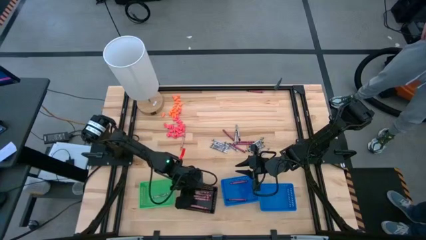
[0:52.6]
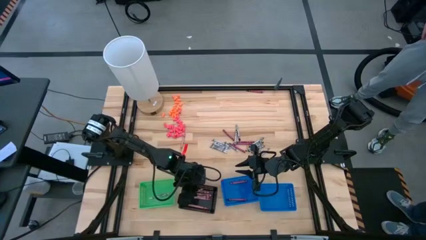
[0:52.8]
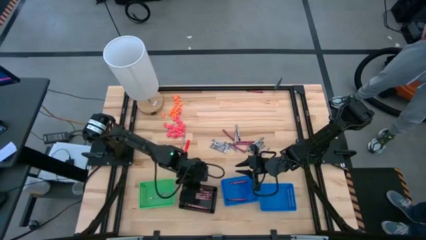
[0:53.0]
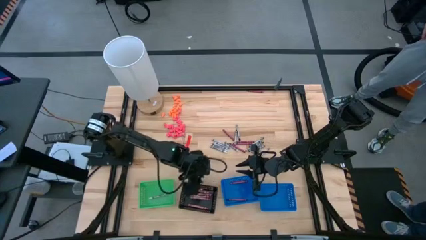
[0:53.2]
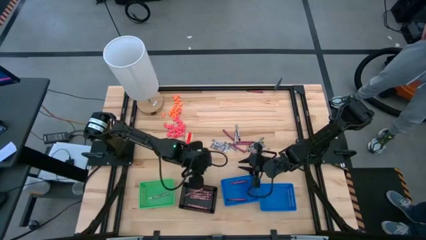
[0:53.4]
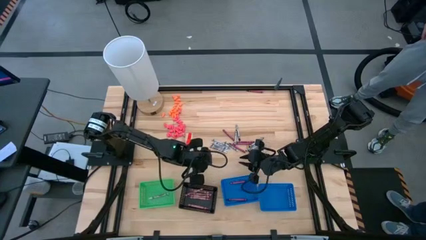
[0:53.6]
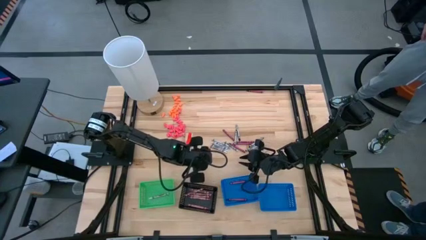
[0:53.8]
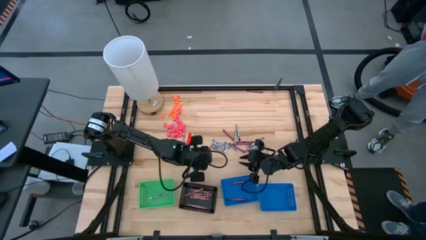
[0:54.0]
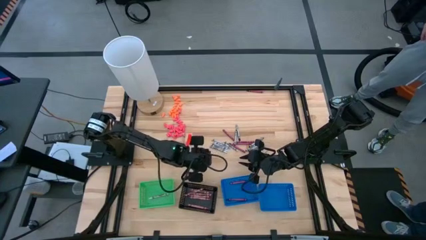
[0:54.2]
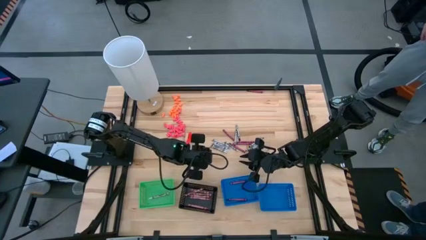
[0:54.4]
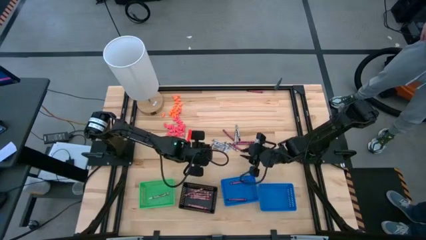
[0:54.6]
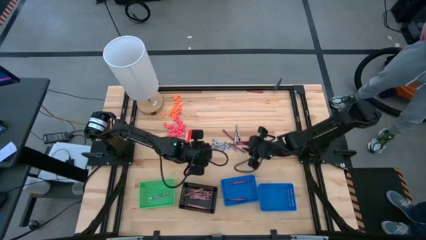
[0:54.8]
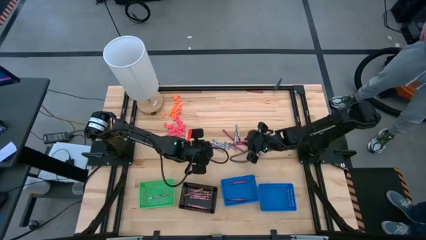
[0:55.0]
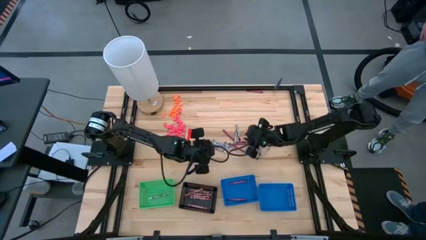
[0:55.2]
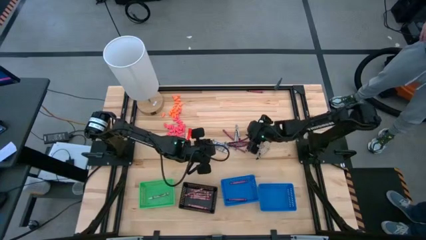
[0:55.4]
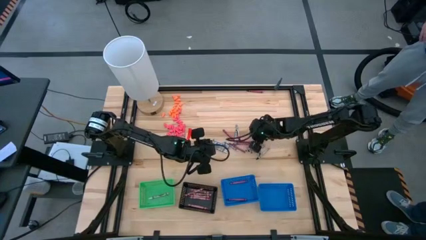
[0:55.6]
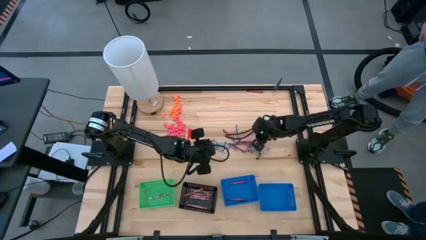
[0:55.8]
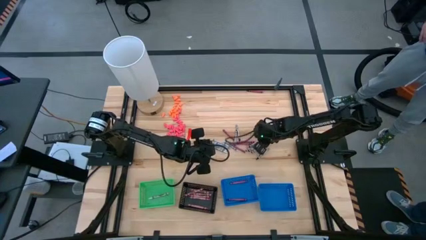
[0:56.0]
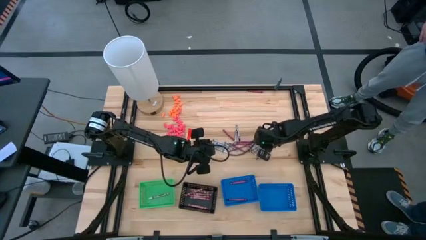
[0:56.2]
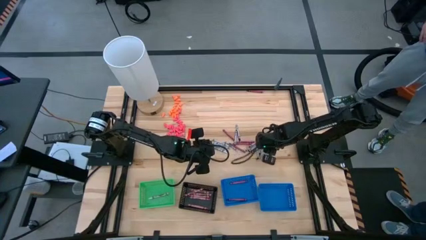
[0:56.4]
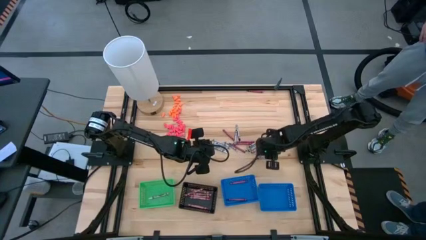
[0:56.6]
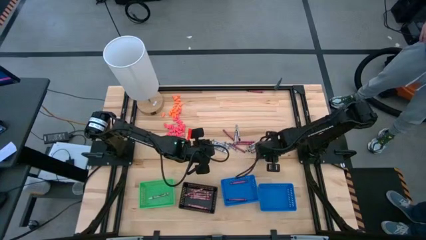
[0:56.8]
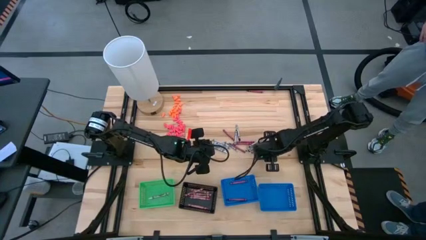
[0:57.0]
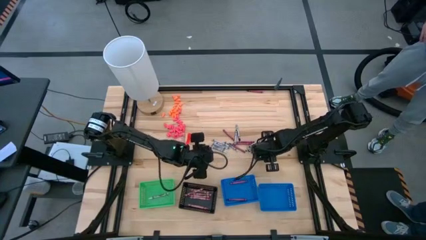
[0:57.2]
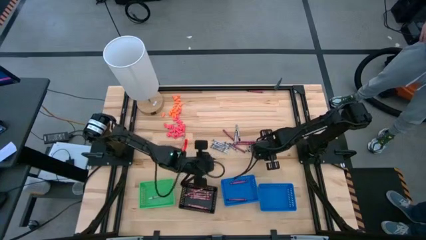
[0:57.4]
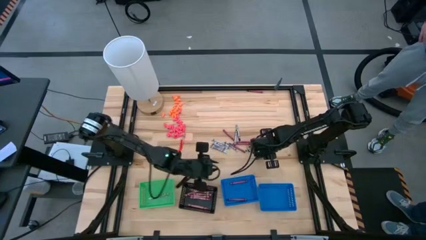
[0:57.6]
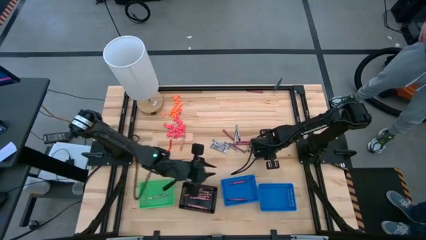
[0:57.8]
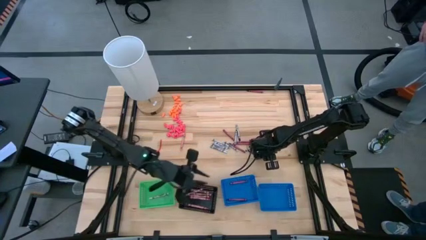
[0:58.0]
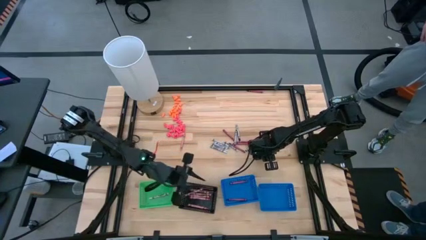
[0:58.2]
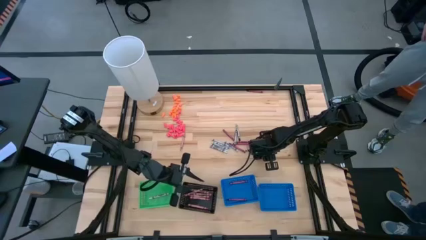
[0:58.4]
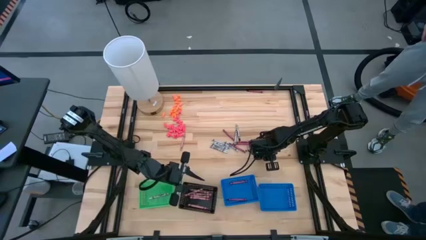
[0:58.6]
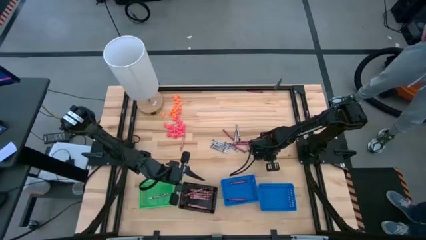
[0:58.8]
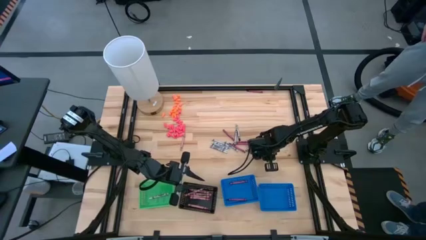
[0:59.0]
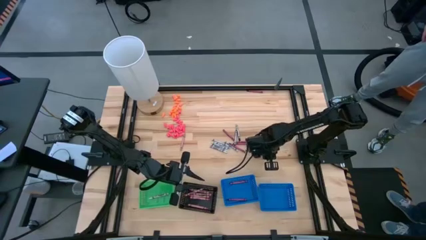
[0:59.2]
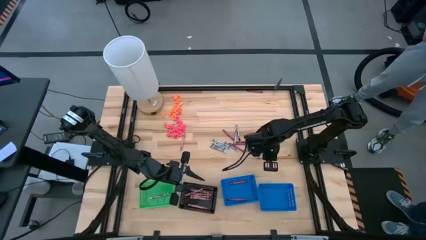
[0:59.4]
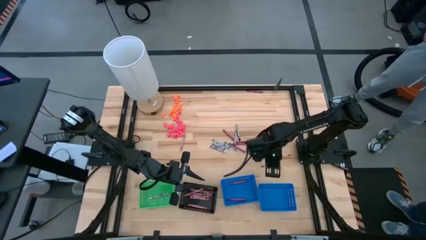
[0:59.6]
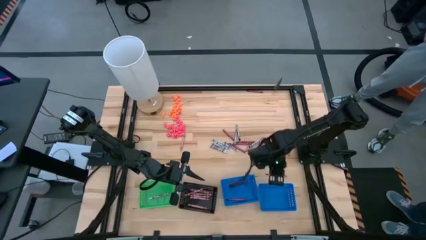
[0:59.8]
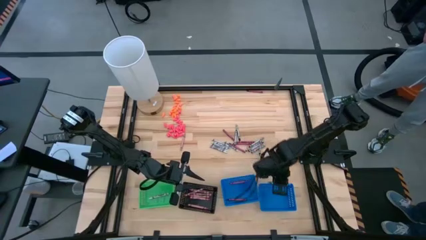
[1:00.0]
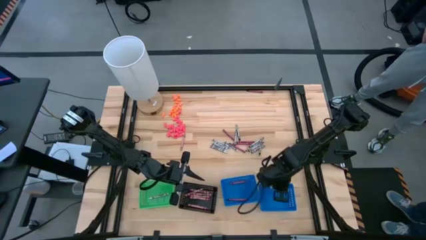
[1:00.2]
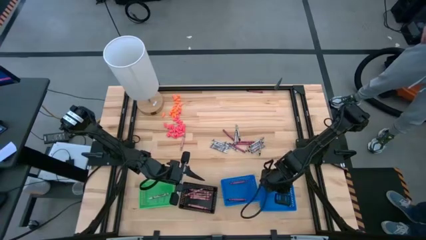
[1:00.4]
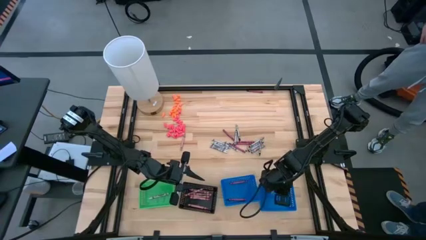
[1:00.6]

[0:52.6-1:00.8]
Task: Sort crayons
Put the black crayon into the right blue bin

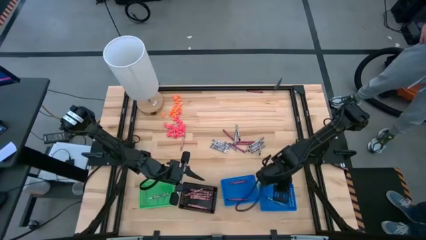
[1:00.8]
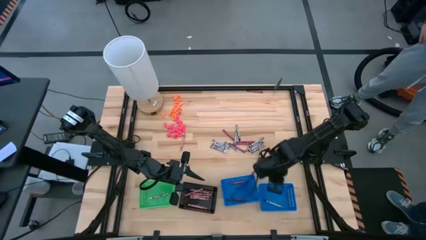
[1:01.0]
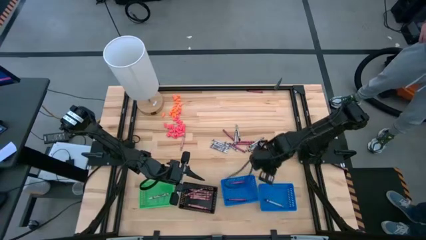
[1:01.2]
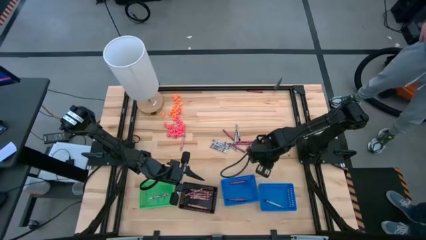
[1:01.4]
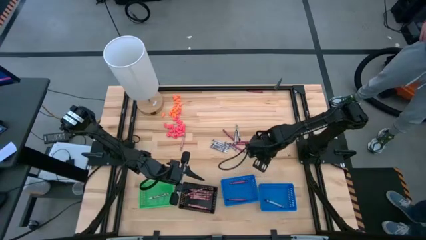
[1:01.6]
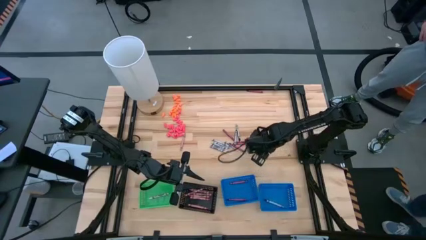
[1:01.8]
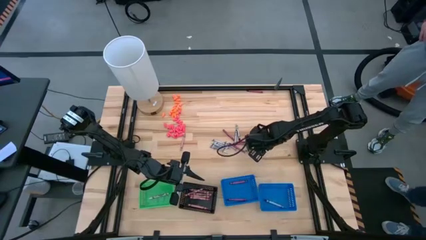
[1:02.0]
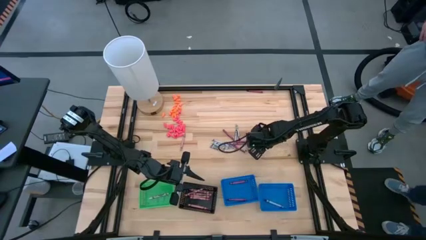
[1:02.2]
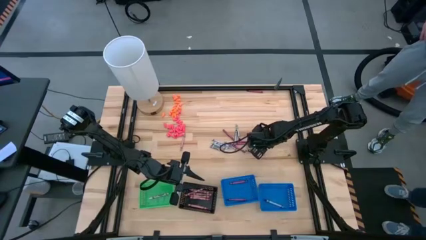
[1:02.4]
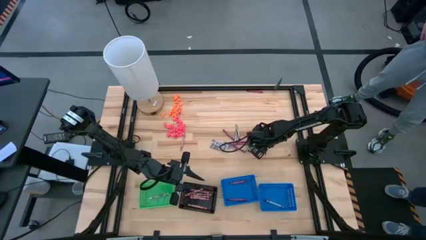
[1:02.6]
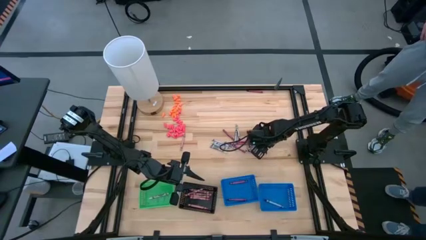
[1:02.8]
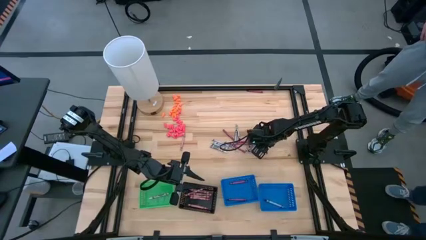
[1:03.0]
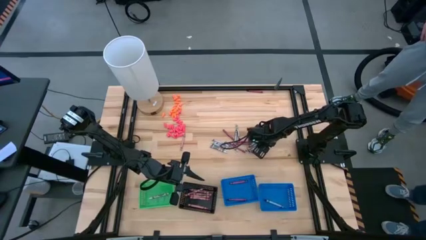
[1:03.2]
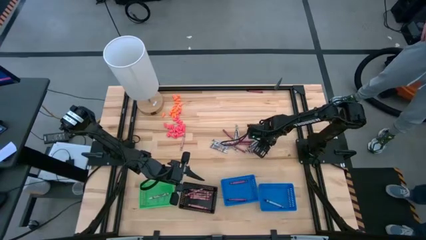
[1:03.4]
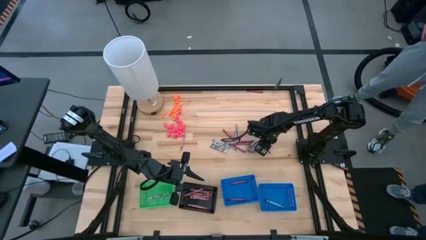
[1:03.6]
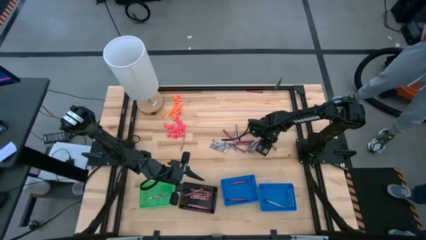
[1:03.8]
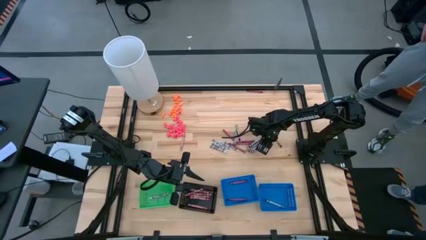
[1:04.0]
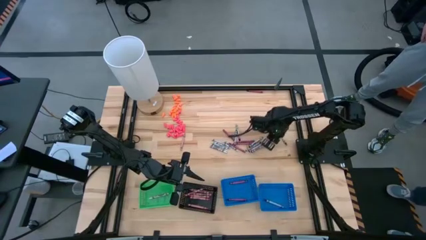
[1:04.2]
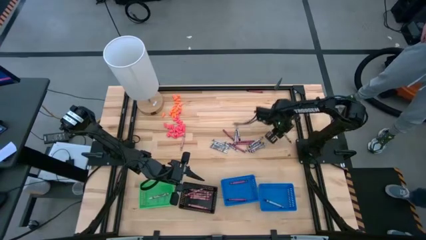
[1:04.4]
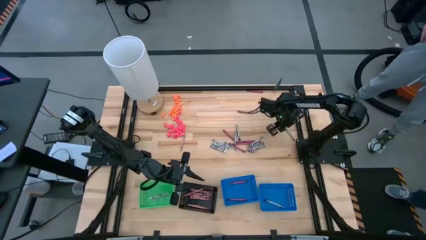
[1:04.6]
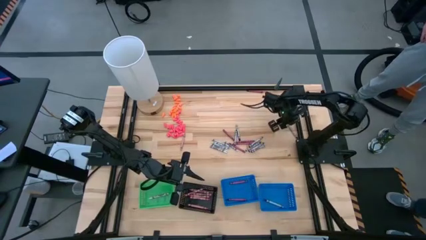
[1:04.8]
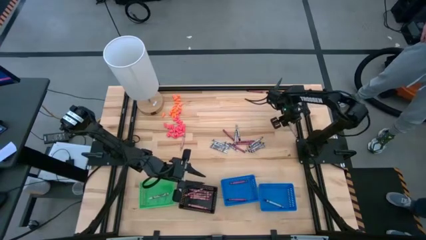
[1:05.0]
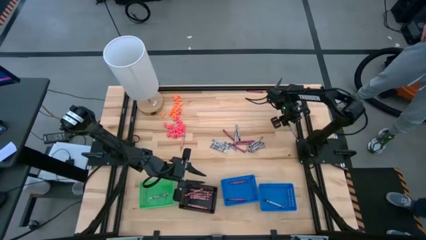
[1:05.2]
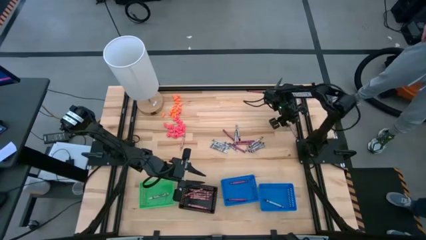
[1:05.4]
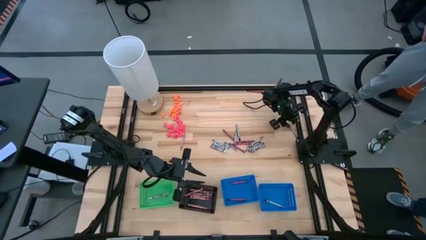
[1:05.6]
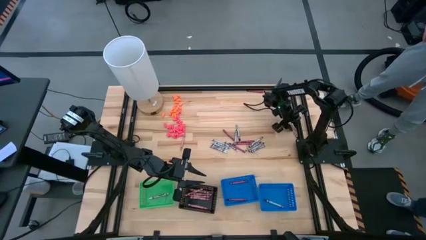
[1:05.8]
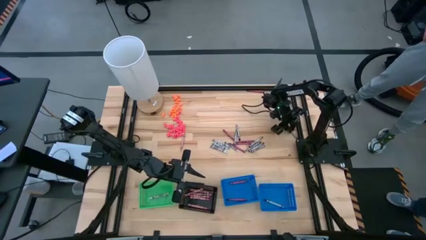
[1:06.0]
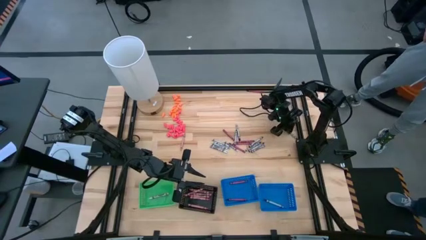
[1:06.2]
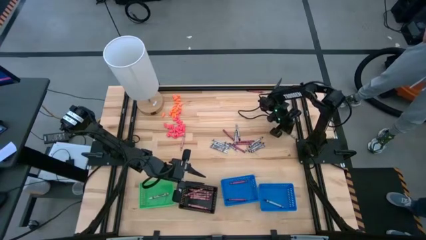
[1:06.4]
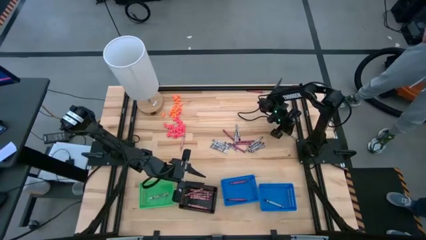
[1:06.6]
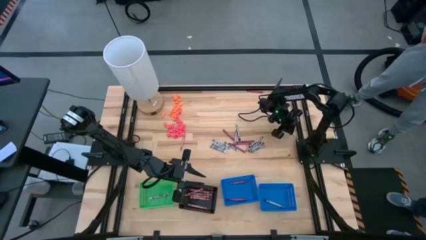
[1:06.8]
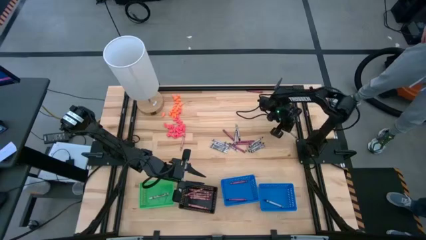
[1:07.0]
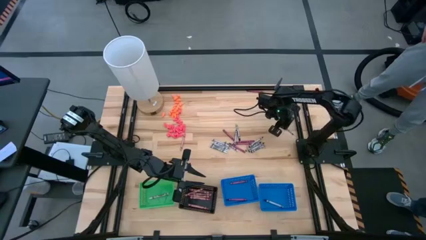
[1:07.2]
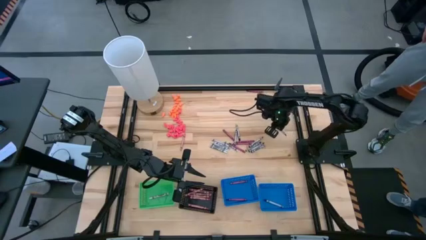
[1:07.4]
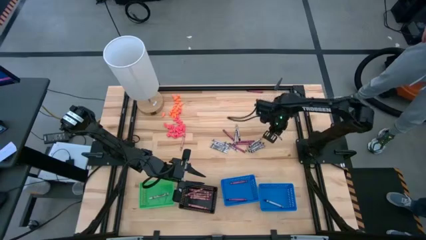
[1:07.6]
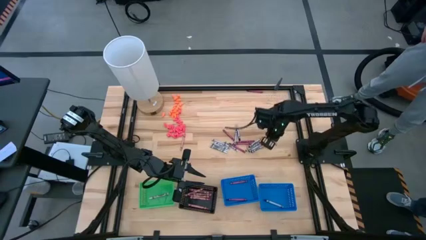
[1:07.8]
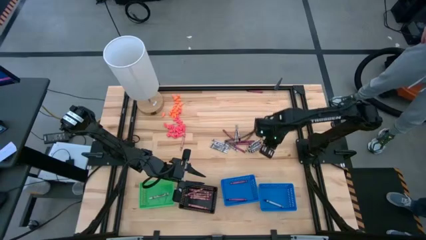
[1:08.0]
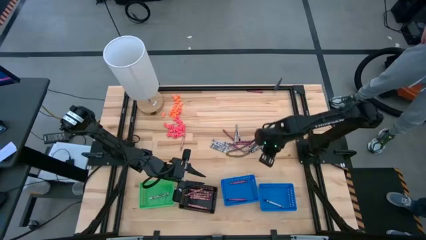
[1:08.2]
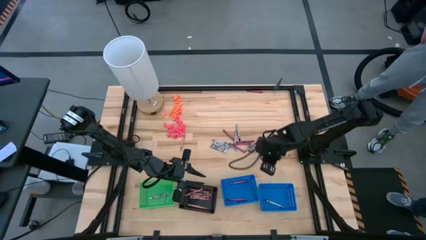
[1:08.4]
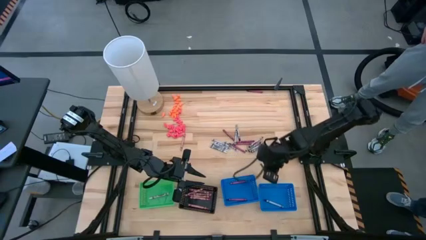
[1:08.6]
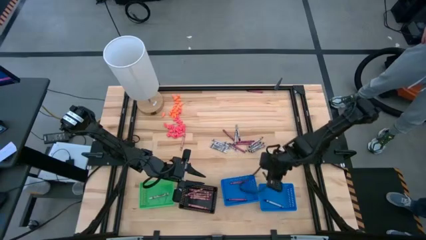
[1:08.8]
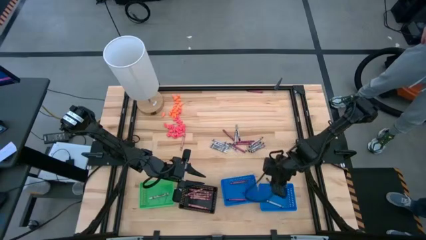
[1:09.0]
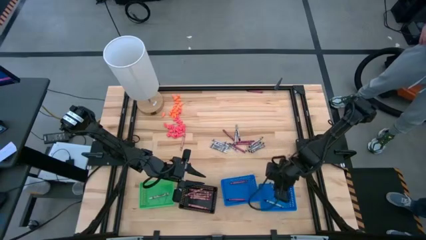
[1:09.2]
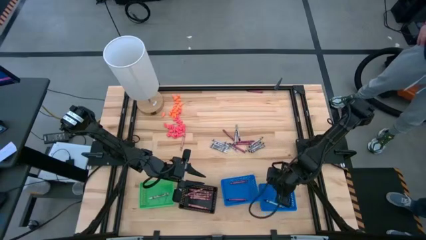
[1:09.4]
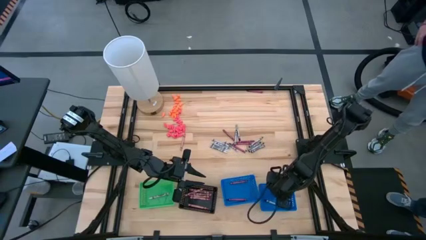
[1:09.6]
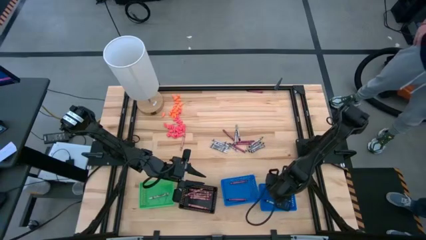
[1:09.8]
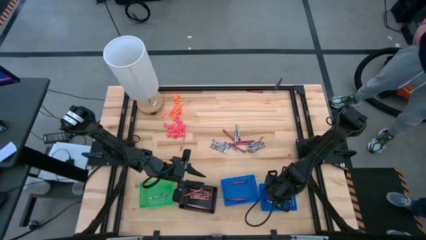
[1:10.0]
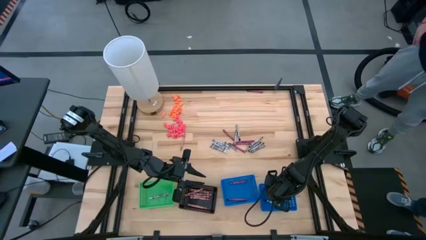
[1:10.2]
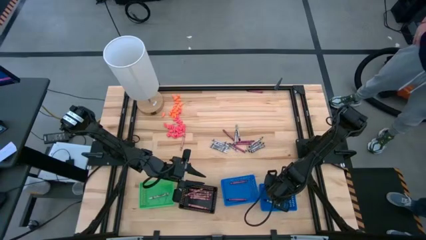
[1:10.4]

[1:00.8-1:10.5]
Put the black crayon into the right blue bin
